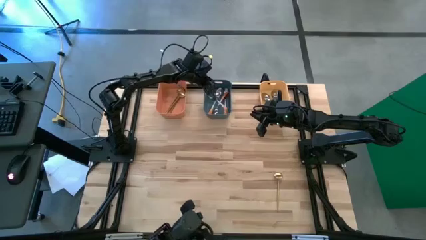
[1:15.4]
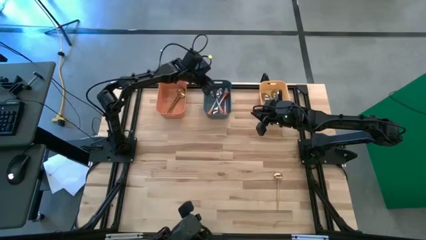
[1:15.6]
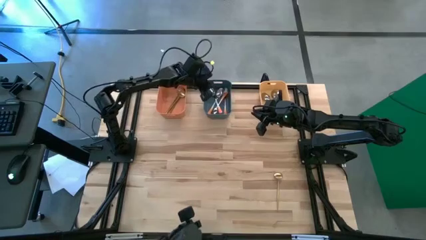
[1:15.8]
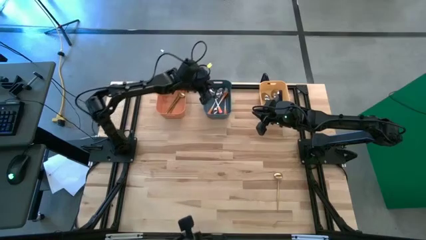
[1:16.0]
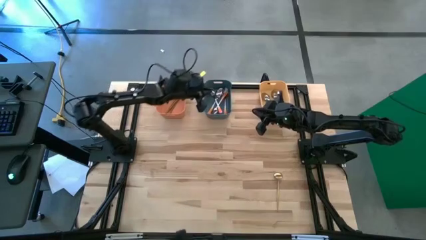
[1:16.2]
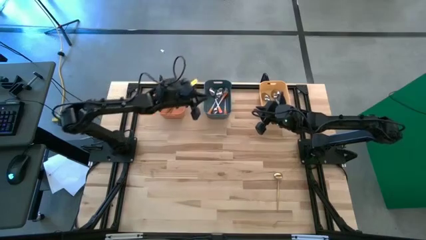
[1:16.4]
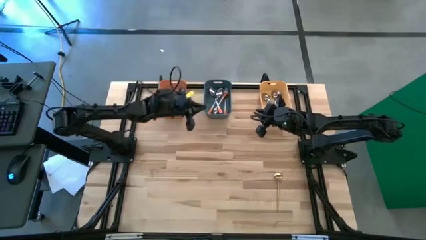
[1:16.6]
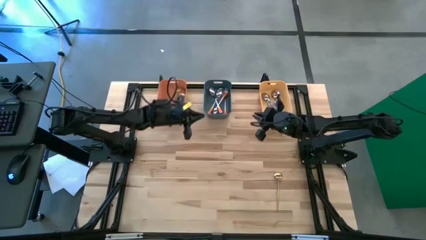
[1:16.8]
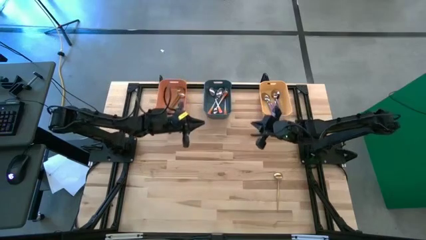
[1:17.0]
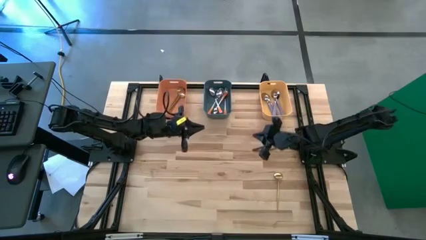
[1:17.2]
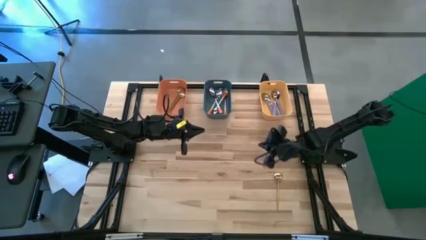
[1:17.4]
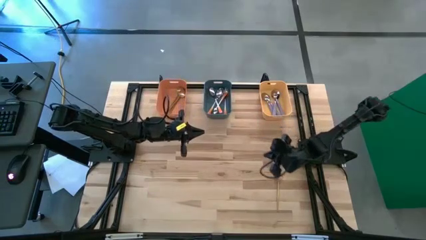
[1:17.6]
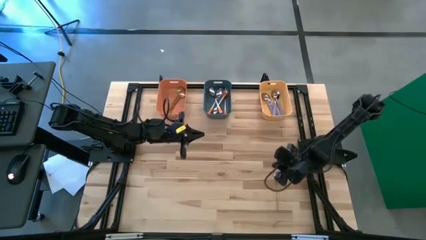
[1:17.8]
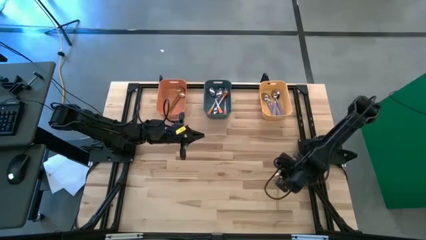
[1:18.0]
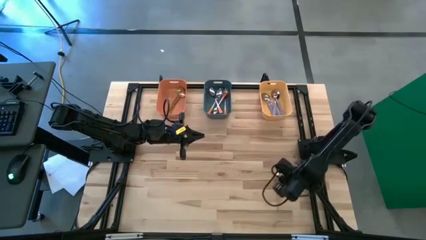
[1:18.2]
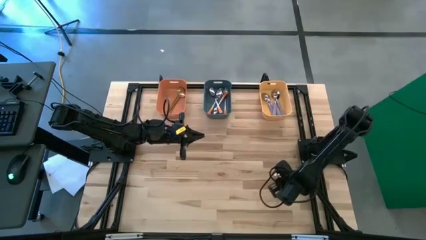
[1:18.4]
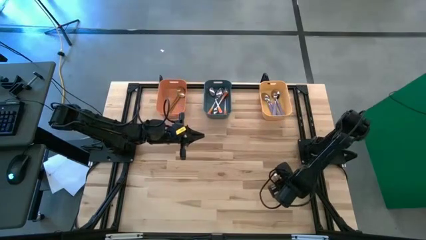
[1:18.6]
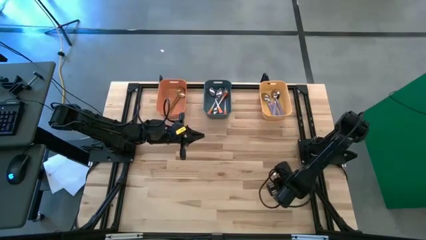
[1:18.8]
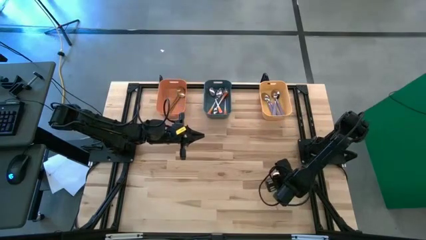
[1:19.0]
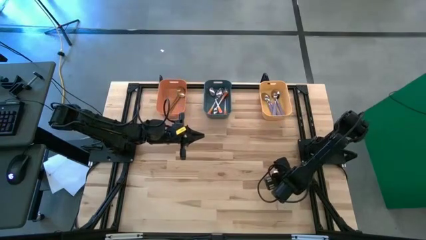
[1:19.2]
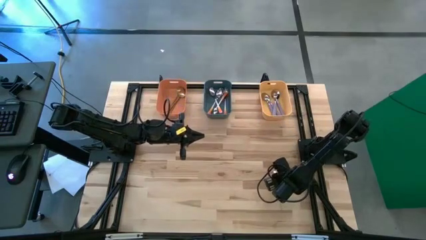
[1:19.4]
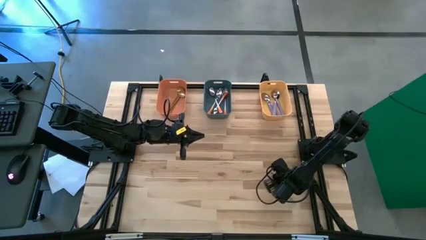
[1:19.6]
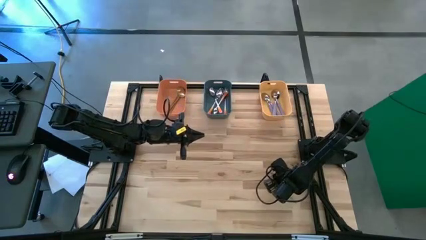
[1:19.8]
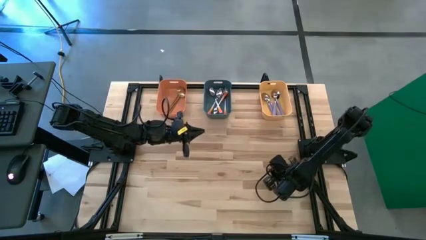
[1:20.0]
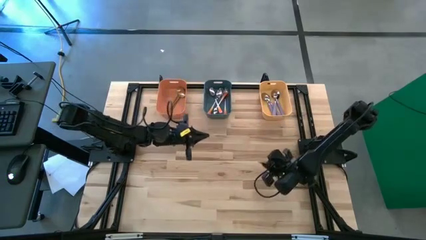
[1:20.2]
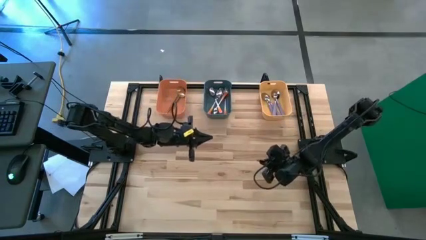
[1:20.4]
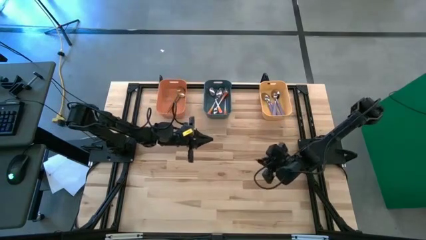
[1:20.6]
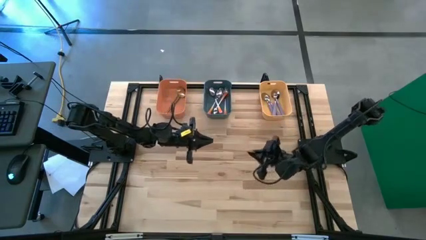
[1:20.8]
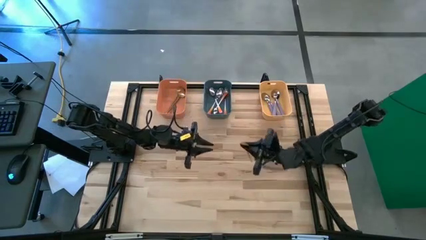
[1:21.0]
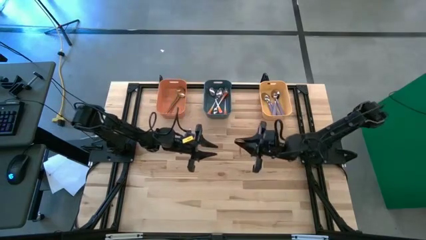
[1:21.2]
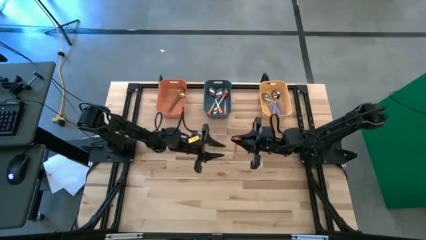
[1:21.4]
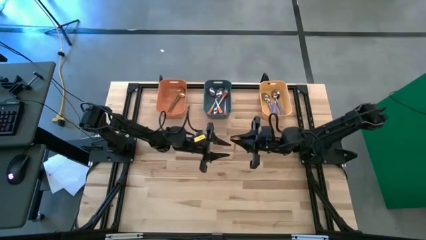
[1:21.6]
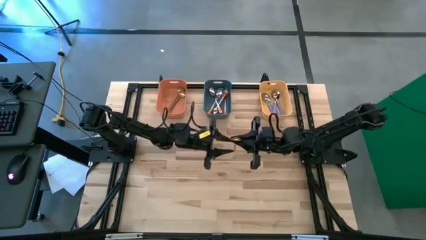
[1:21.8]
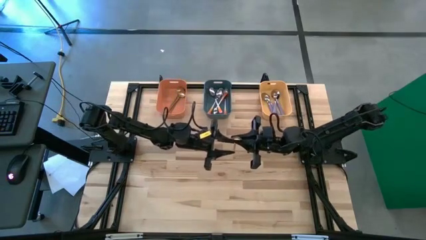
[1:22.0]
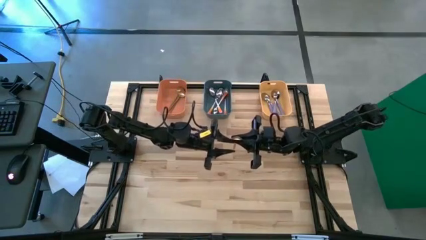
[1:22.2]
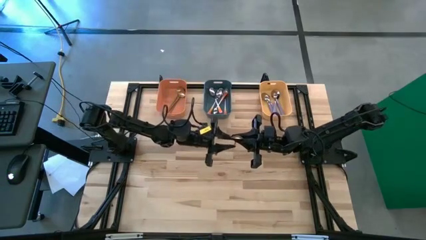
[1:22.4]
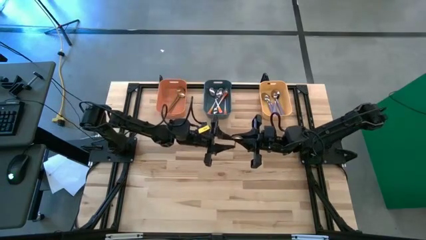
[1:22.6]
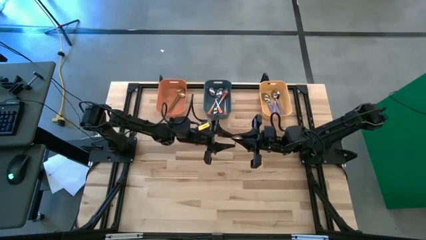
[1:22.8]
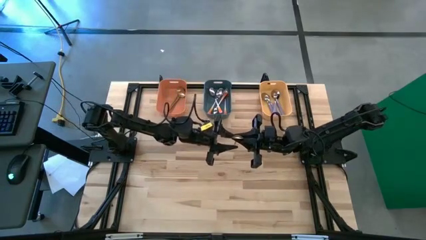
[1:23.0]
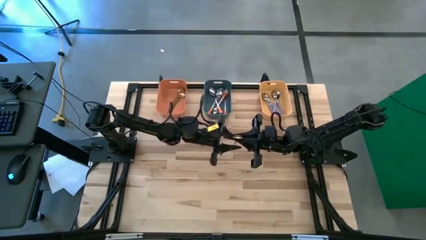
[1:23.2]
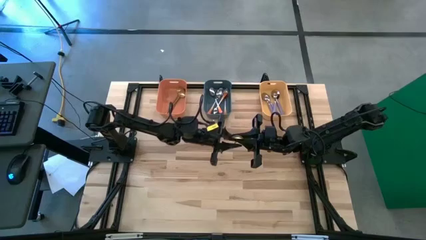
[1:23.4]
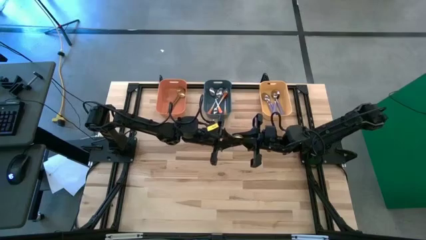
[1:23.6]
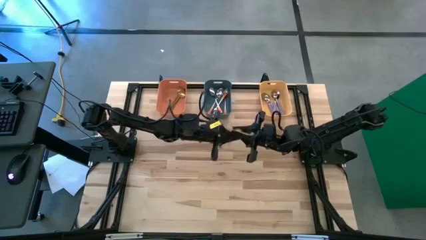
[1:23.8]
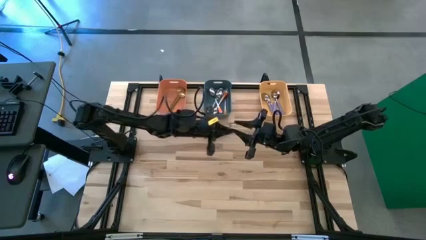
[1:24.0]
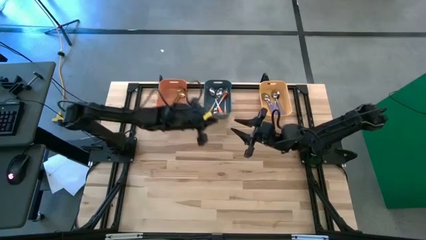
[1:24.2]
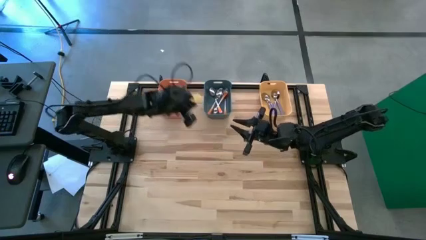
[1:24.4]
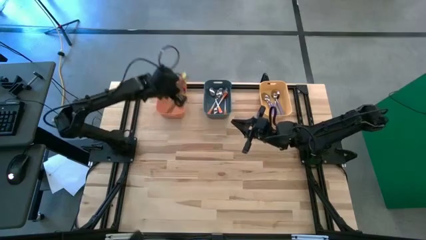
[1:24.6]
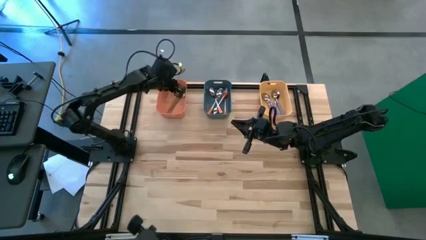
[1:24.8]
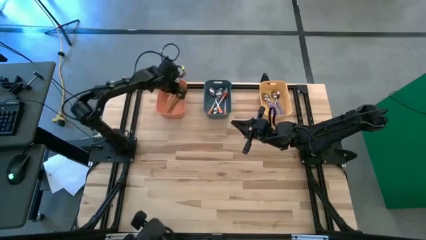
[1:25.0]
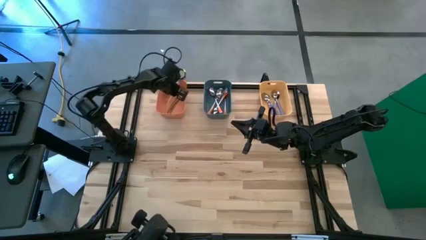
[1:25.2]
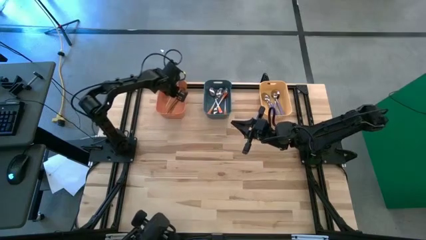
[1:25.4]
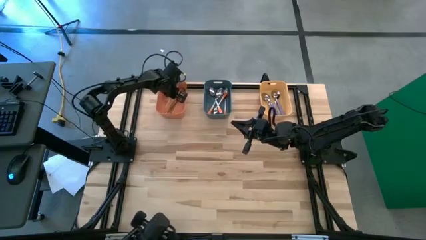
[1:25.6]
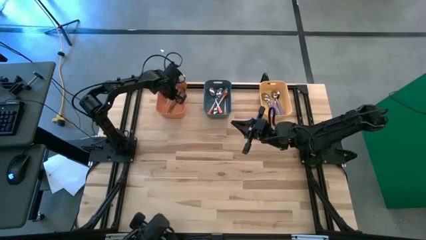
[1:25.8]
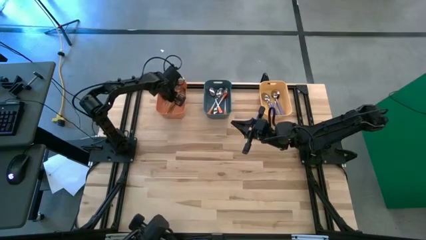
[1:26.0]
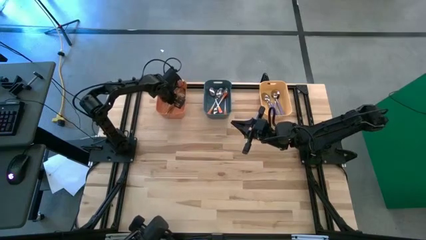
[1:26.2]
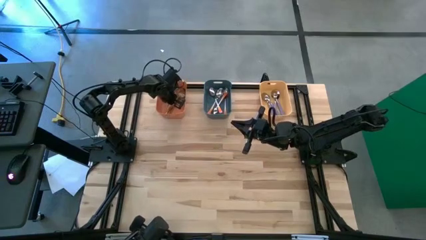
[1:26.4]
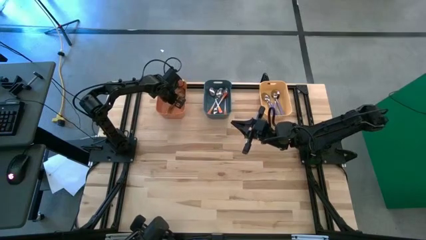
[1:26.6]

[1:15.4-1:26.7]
Task: Sort silverware by color (type)
Put the gold spoon into the orange bin

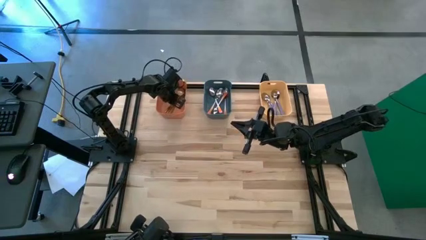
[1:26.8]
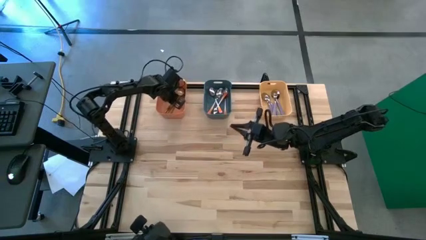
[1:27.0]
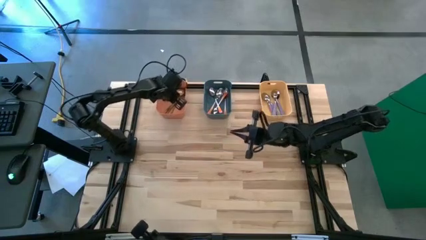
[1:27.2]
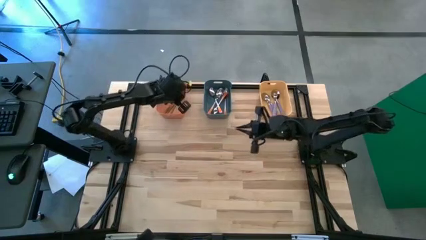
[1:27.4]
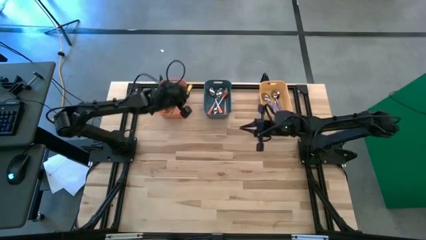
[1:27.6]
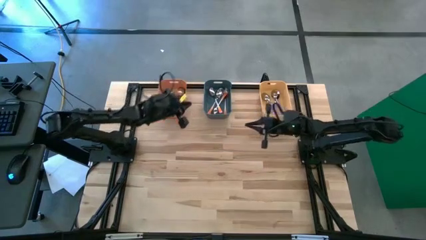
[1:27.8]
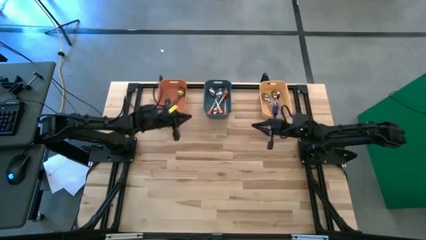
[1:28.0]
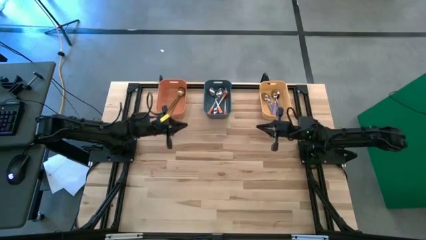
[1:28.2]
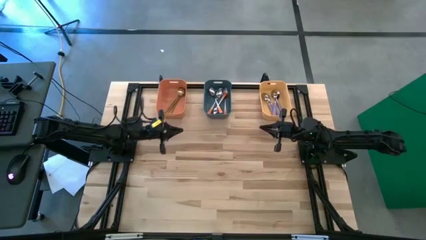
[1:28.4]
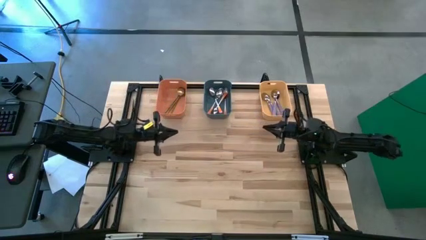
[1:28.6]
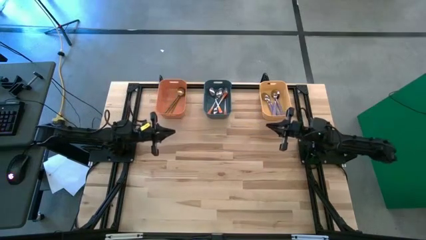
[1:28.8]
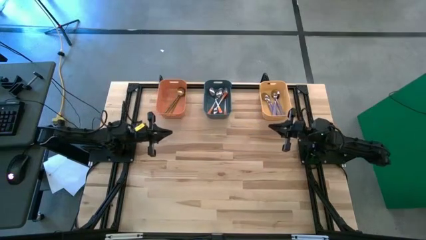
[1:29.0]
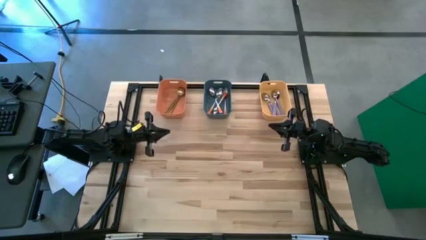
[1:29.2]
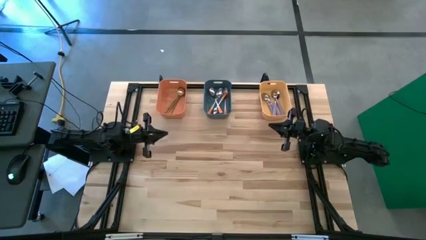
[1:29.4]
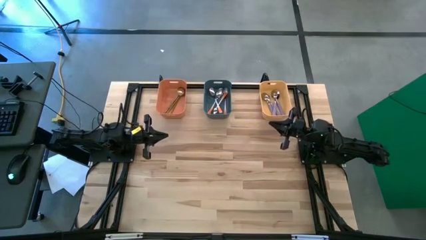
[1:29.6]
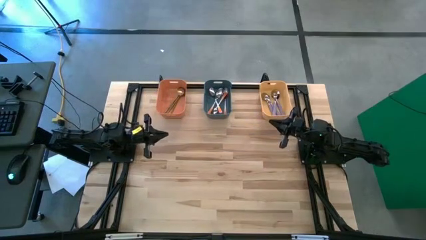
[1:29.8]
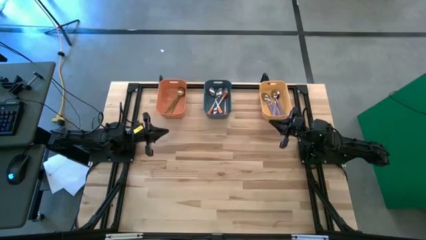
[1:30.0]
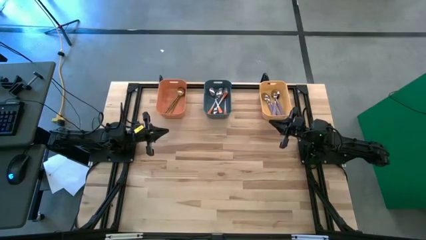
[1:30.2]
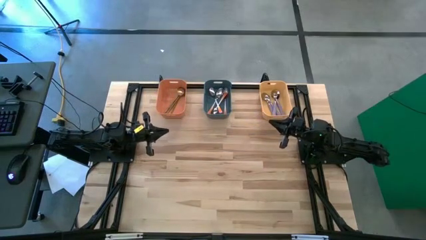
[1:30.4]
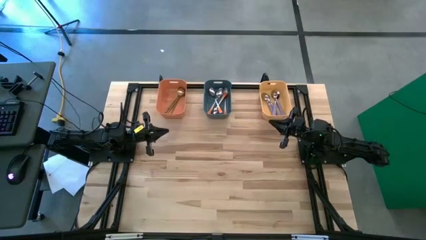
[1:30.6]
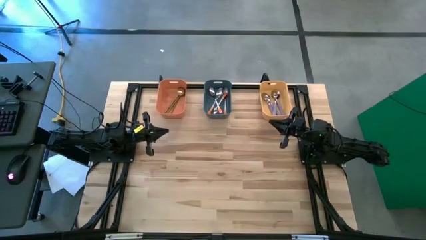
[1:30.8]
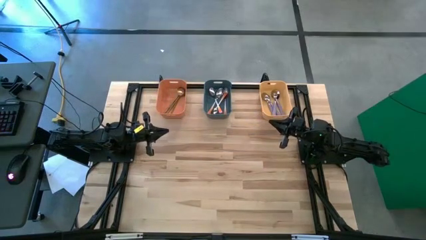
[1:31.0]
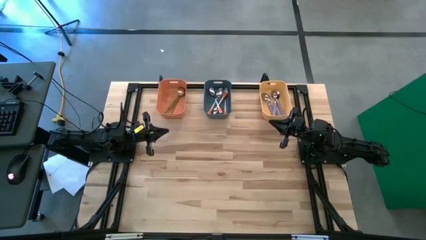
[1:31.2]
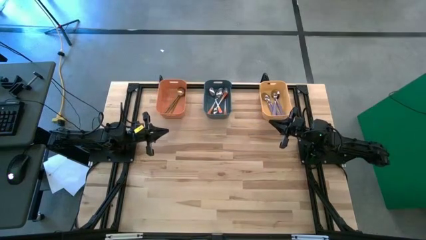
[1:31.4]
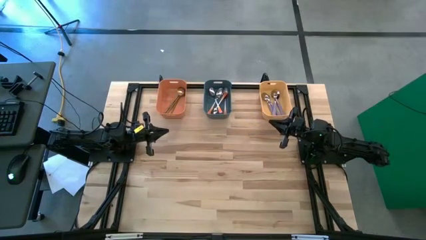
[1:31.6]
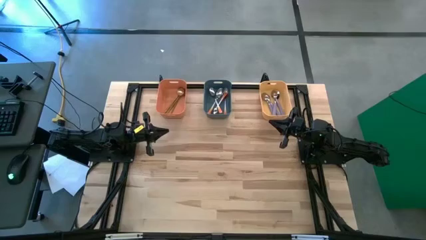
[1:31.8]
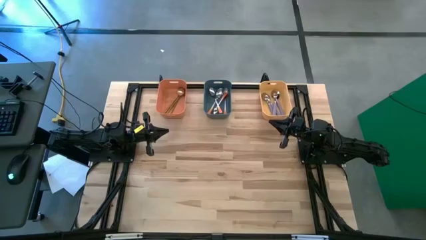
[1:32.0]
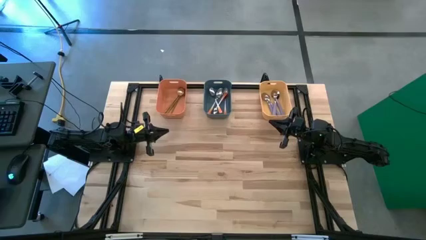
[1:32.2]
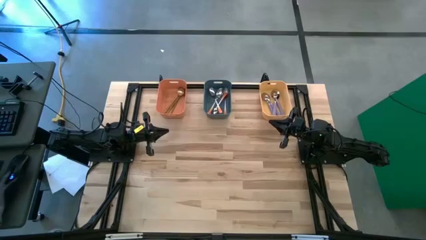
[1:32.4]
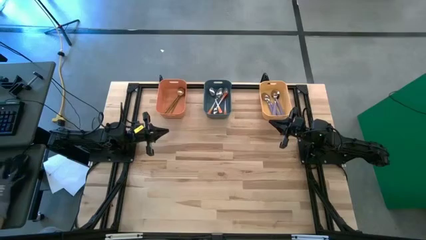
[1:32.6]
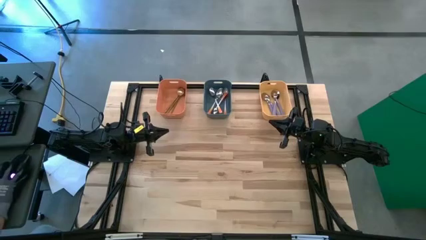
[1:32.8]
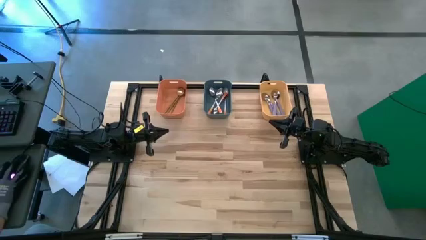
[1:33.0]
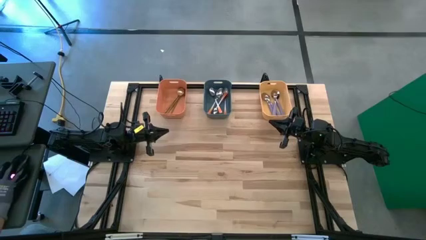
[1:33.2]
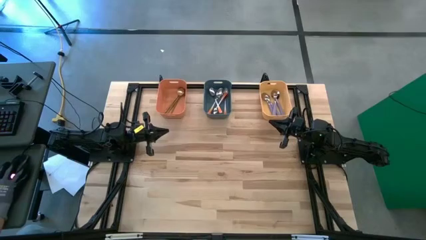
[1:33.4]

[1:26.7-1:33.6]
Return to Home Position
